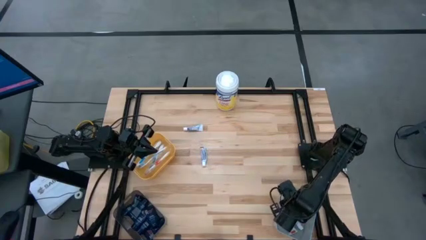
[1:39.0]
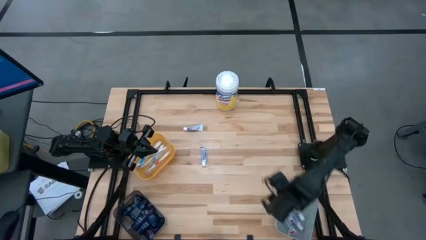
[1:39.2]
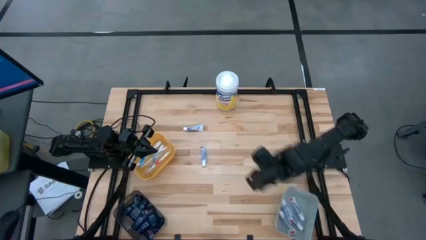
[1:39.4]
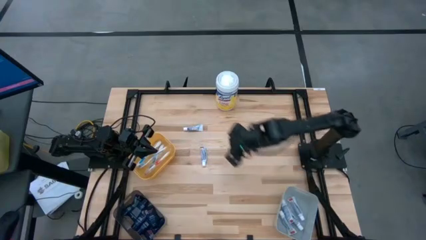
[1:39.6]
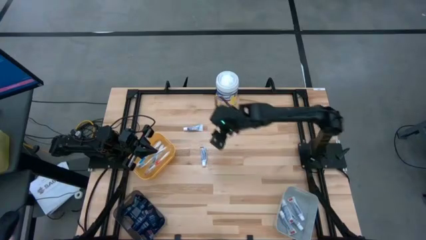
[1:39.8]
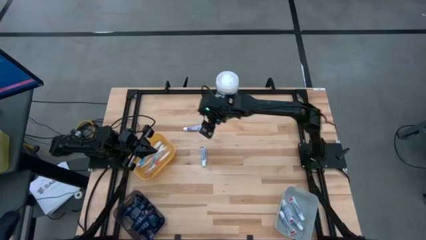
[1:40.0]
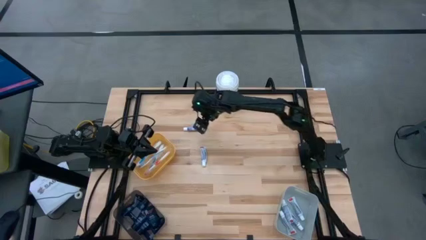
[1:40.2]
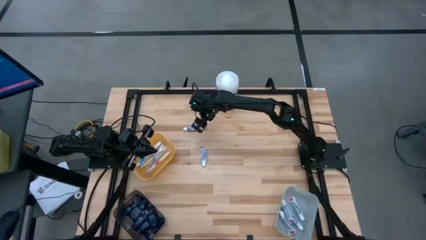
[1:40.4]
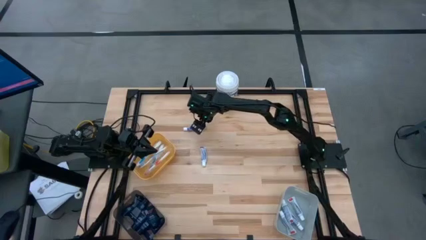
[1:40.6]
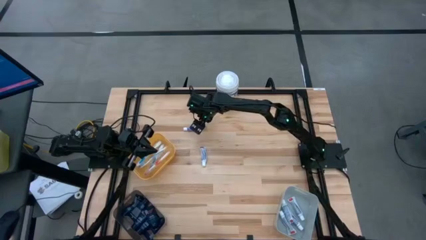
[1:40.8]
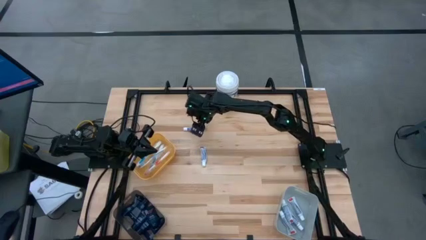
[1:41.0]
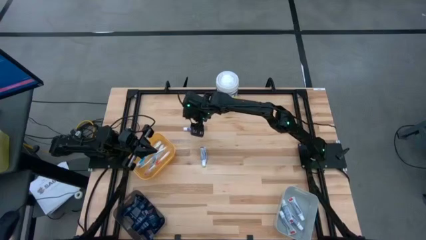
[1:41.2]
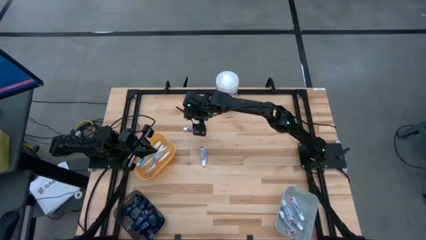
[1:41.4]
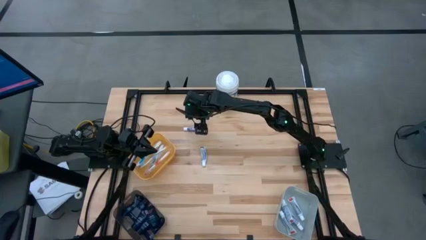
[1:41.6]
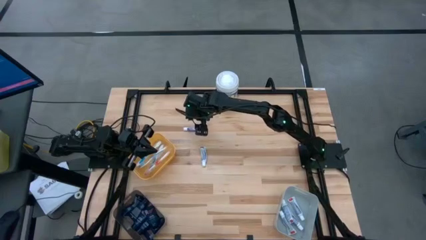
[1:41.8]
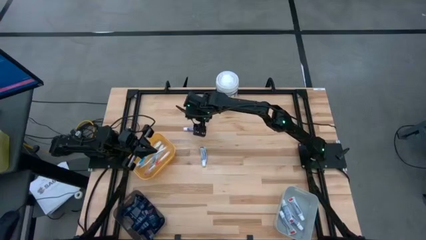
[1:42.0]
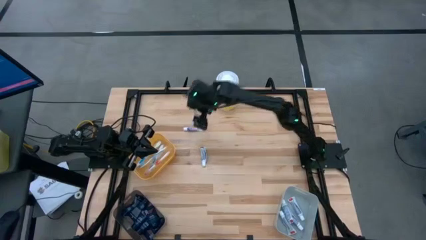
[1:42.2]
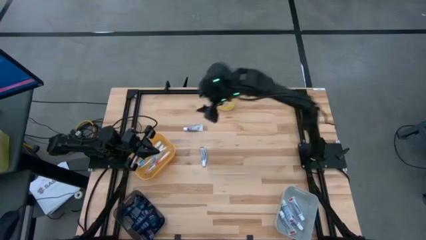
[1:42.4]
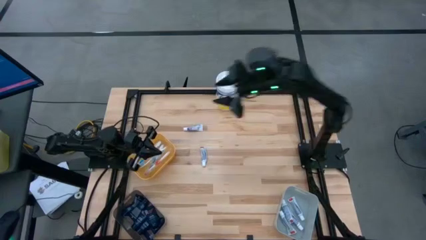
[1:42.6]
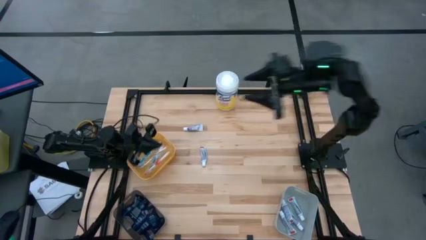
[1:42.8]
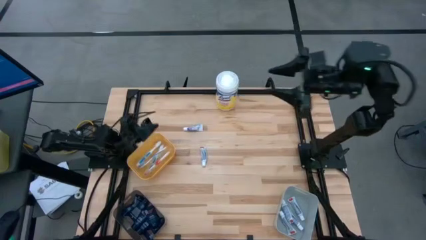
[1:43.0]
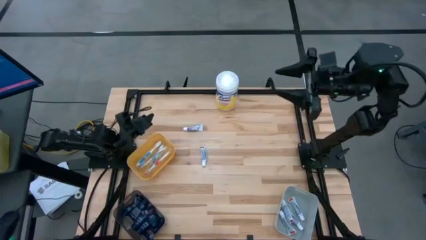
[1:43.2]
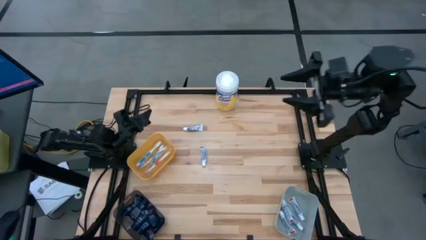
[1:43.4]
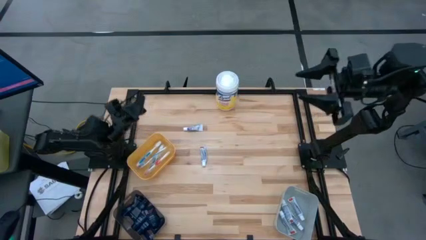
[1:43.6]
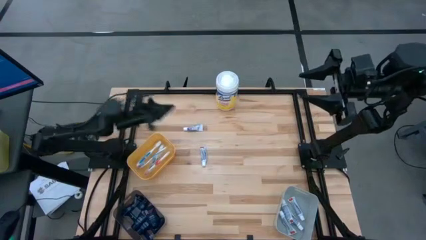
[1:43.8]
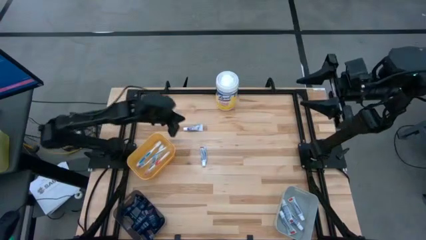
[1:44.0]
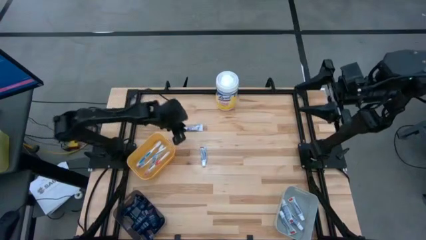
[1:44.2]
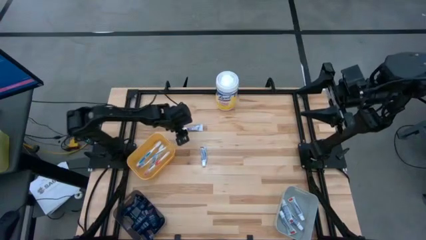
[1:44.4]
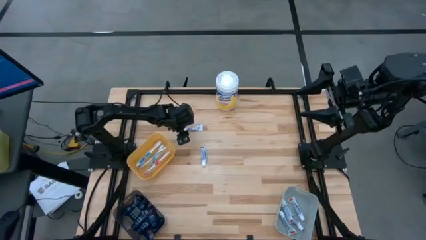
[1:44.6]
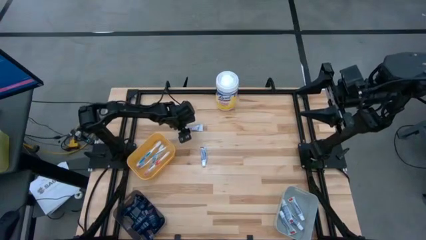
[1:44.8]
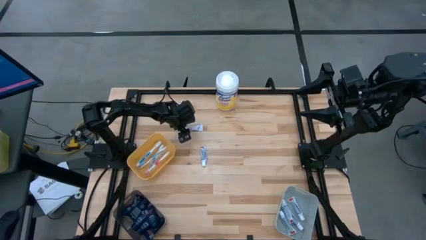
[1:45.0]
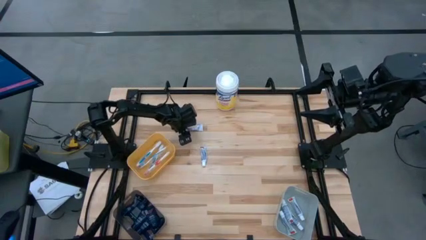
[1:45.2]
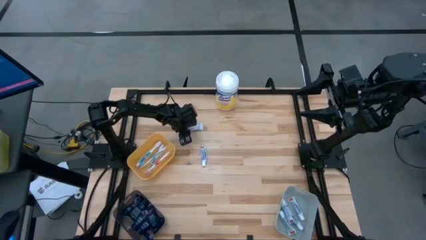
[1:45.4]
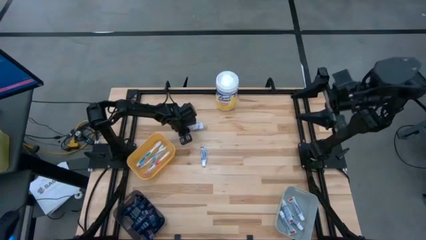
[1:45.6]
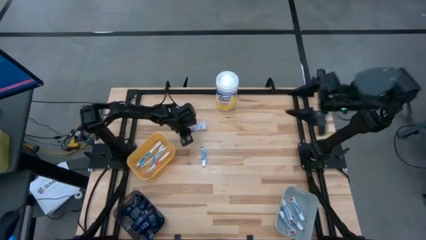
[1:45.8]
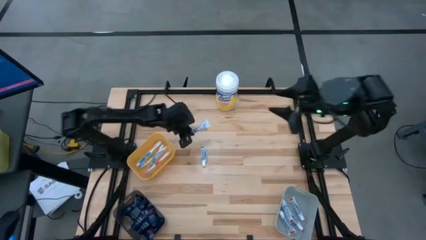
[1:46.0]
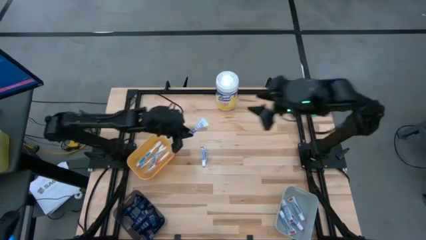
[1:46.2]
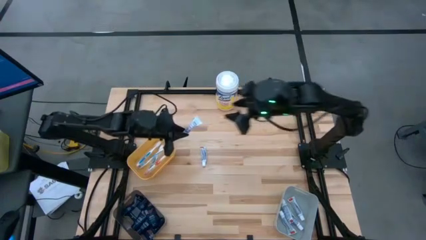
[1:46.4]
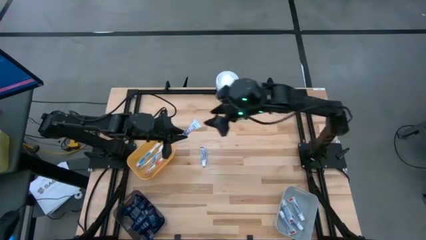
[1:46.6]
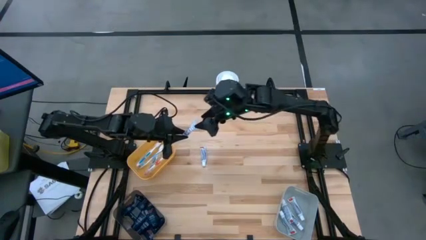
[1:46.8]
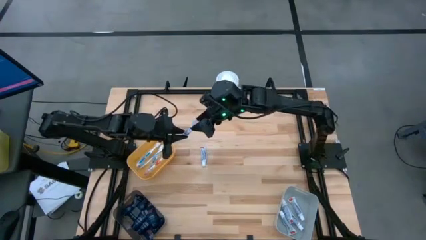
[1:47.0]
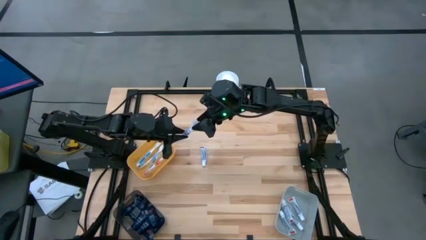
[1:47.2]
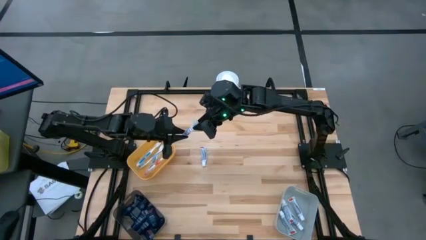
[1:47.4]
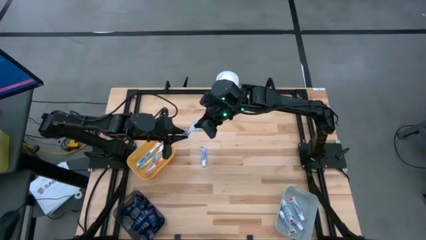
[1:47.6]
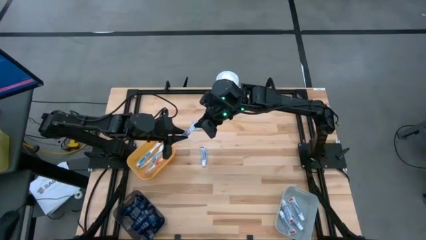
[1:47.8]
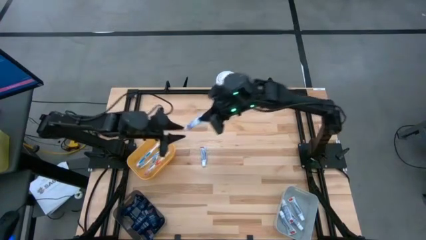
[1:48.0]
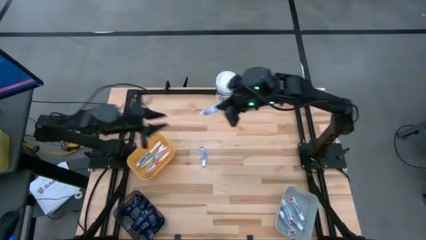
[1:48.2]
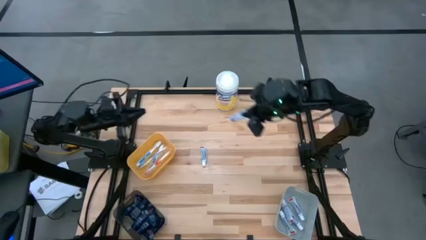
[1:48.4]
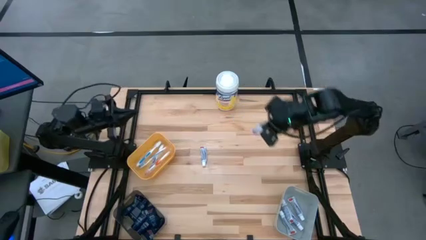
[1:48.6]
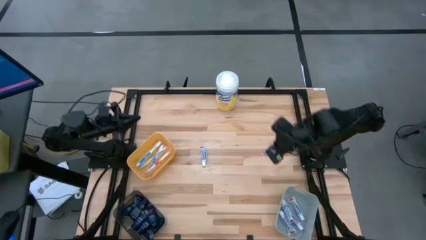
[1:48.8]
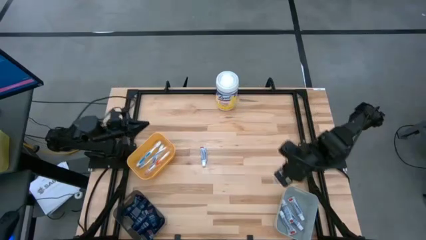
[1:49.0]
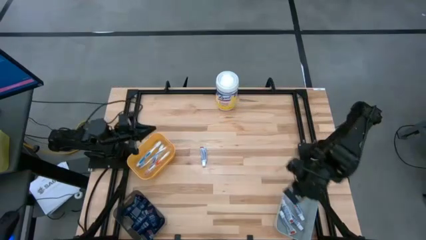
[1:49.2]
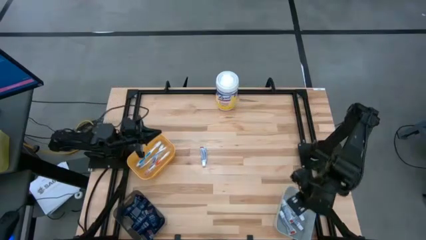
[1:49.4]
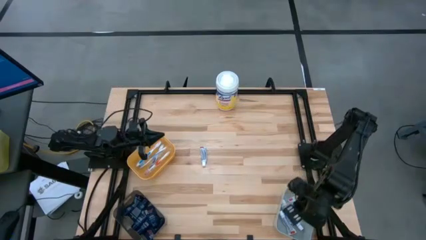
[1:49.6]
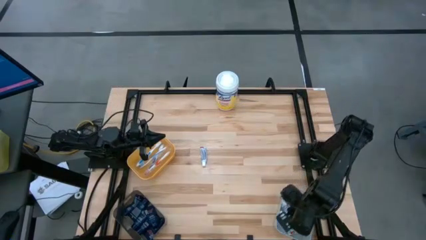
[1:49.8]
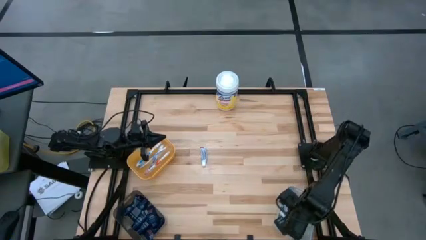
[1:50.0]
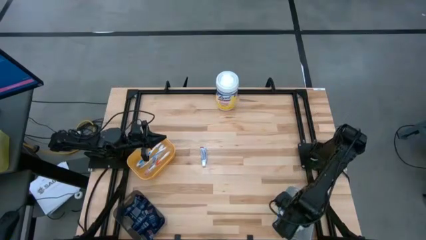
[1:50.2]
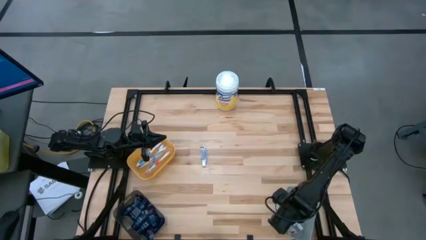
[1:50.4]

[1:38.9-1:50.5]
Task: Pick & Place Travel size toiletries
Put the white toothpaste into the white bin

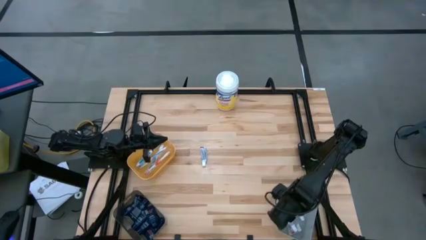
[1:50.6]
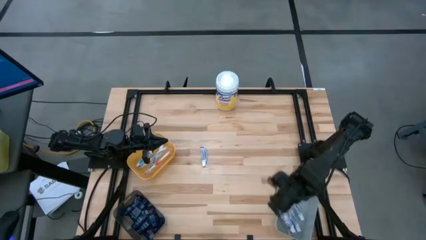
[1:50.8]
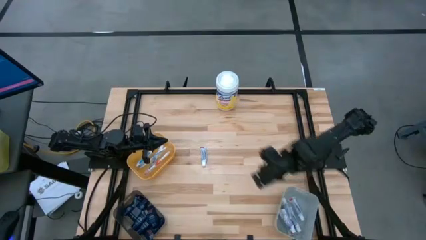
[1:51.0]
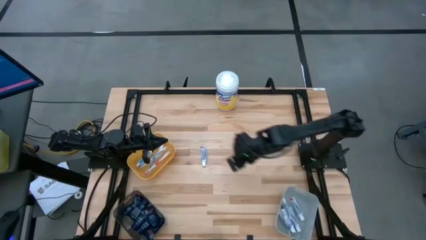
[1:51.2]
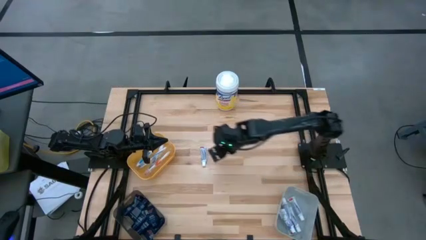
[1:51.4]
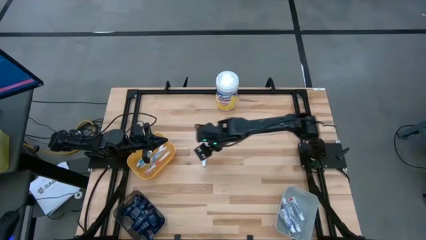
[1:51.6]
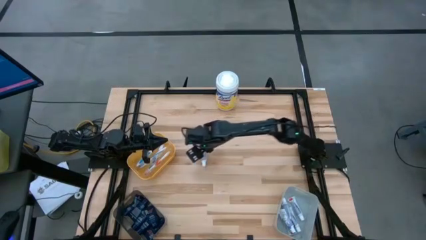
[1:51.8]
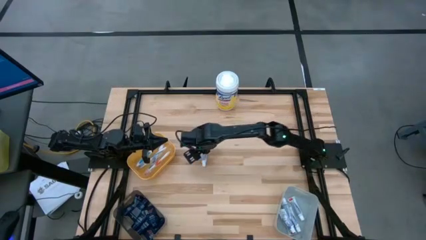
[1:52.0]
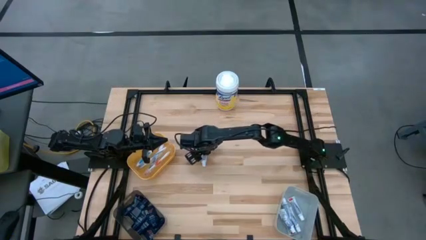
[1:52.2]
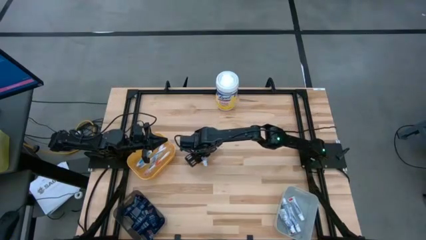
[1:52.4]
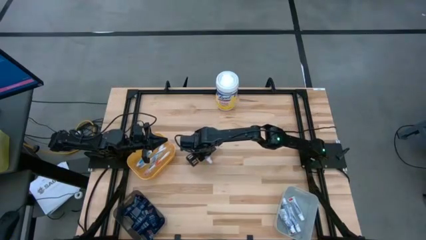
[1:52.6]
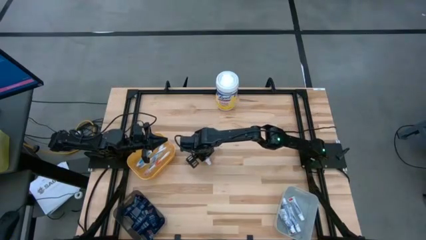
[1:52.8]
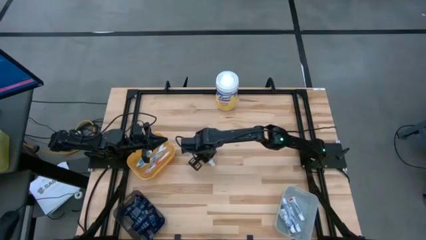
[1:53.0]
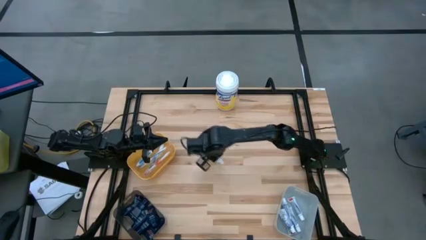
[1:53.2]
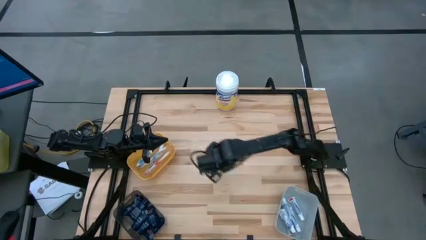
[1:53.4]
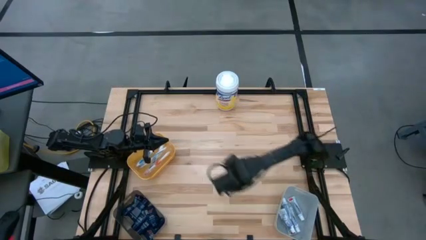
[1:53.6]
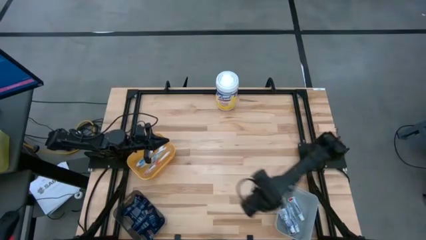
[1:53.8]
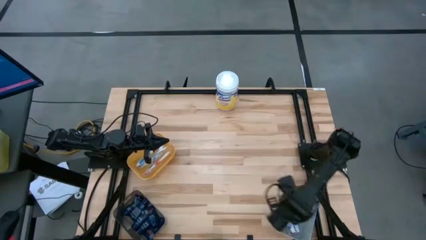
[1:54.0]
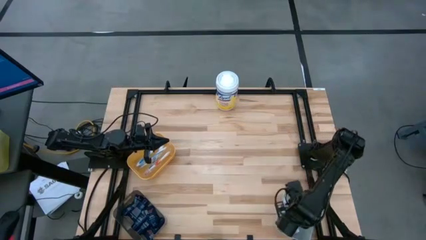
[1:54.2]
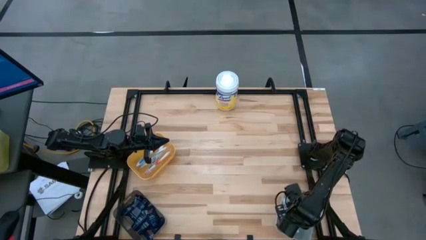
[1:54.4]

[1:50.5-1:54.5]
Put the white toothpaste into the white bin
